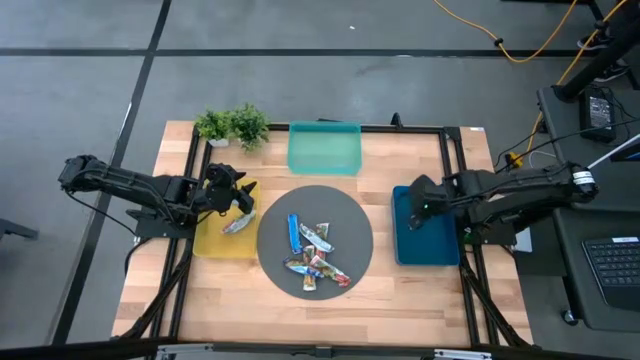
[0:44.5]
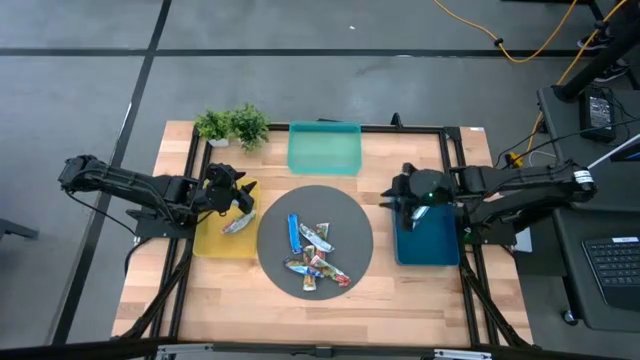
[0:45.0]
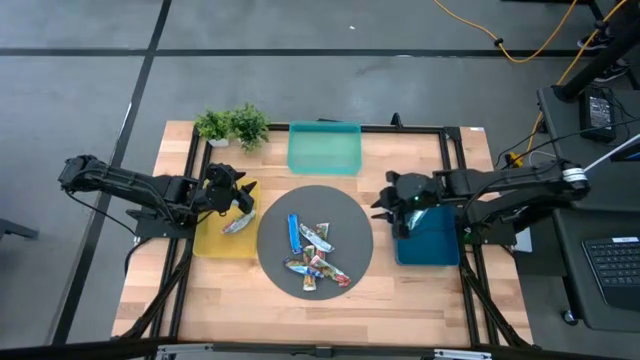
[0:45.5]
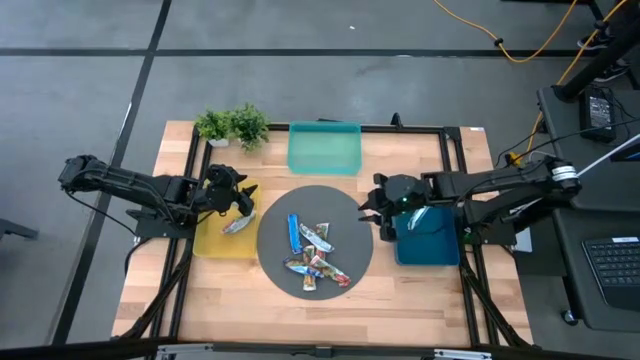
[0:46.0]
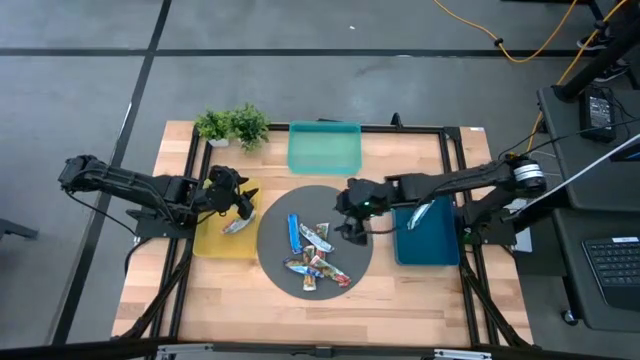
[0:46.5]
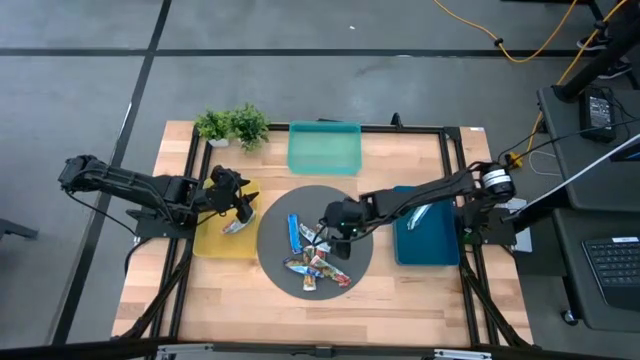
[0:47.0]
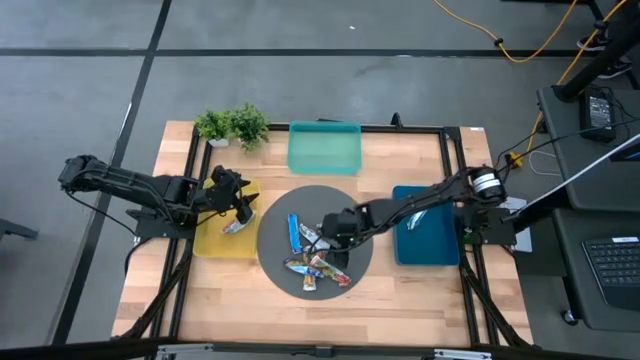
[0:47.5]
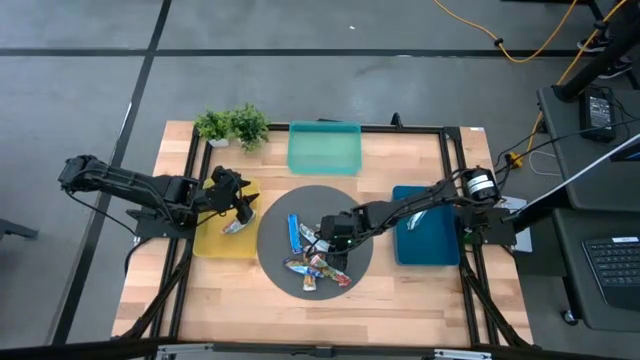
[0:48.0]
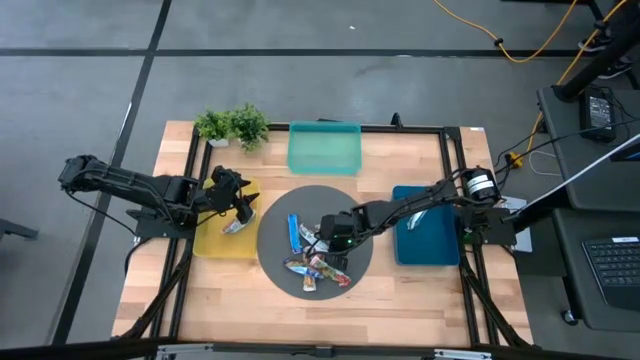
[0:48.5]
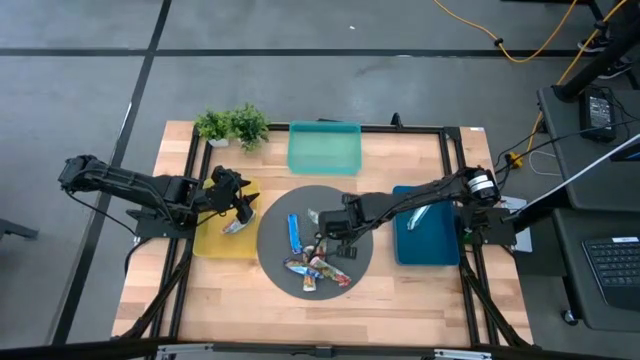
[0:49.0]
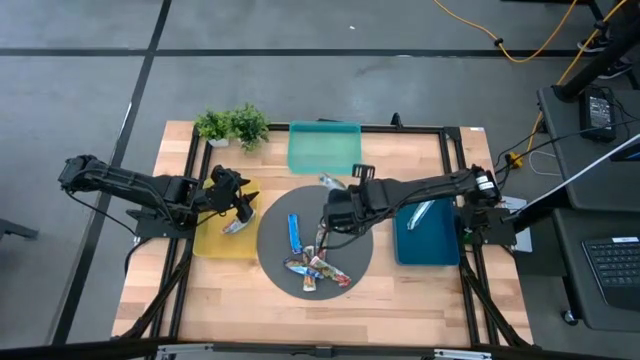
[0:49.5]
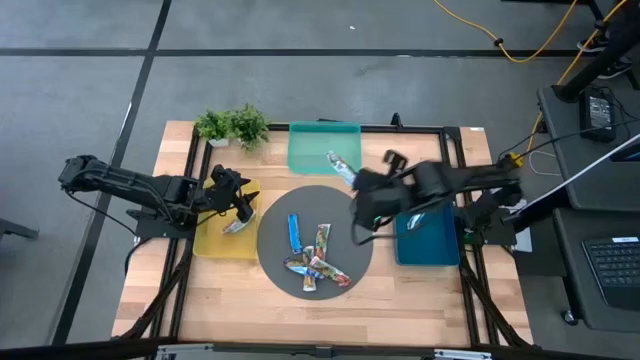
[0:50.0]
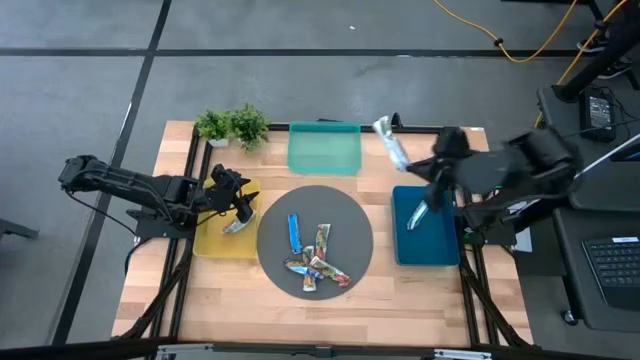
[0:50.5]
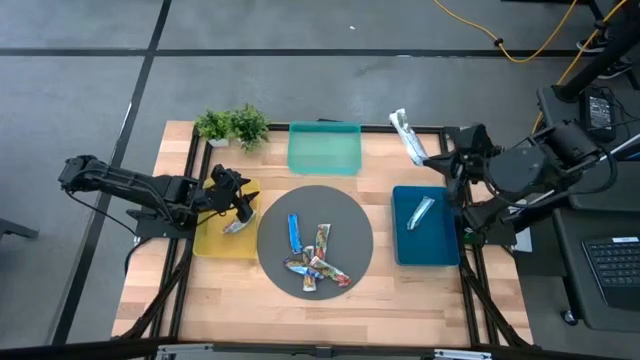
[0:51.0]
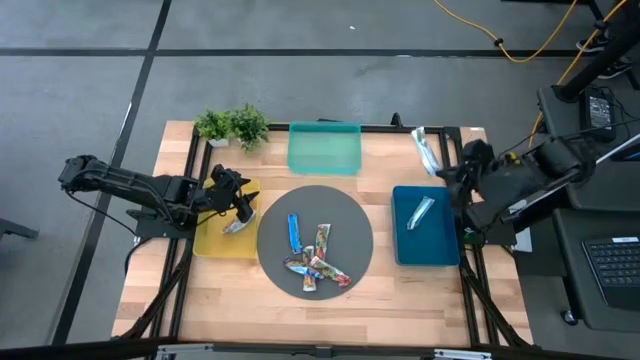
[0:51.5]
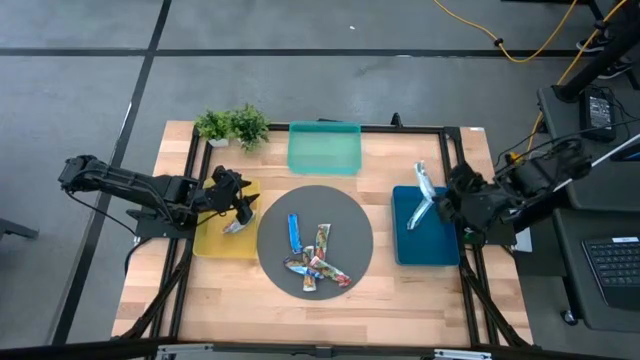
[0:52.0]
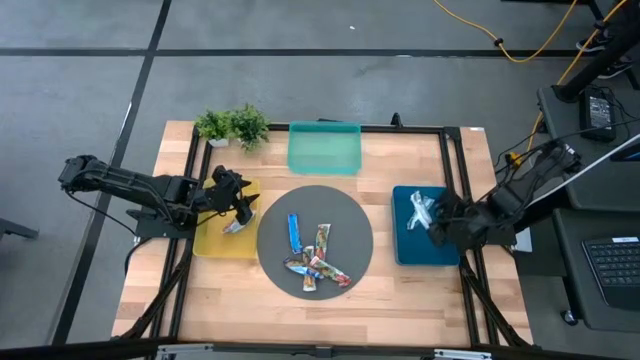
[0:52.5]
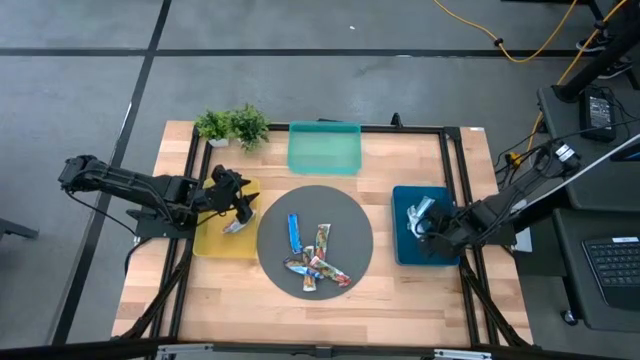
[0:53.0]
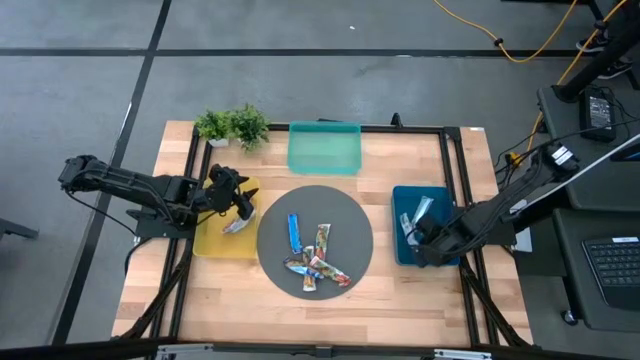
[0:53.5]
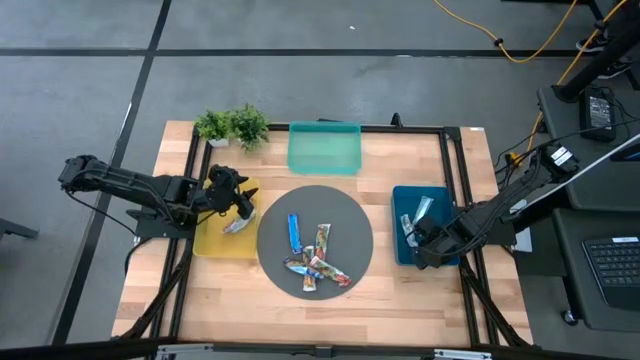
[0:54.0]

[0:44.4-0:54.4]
Task: Pick and place Granola Bars by type
Put the yellow granola bar into the blue bin

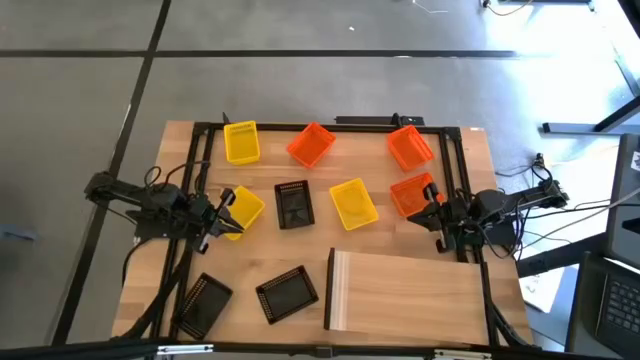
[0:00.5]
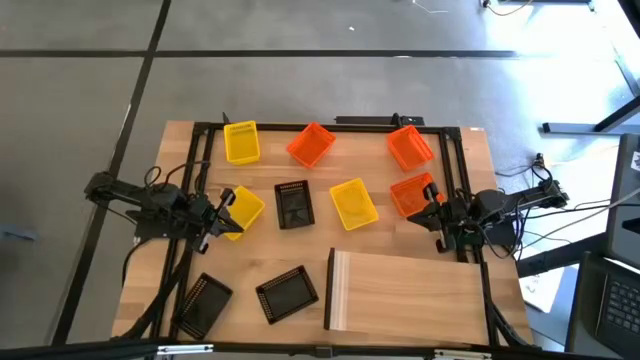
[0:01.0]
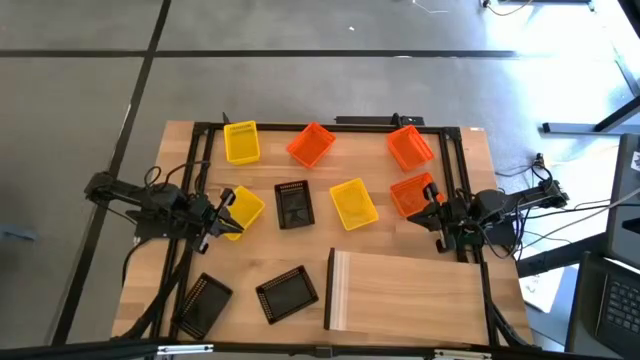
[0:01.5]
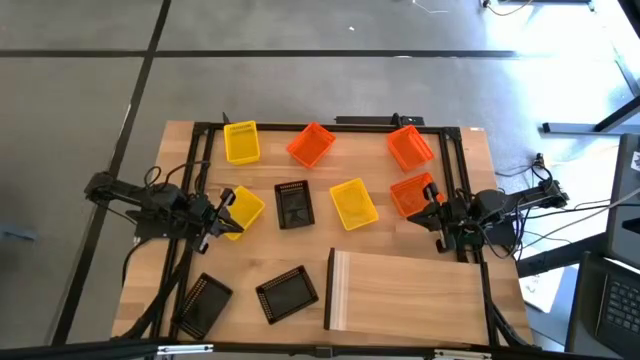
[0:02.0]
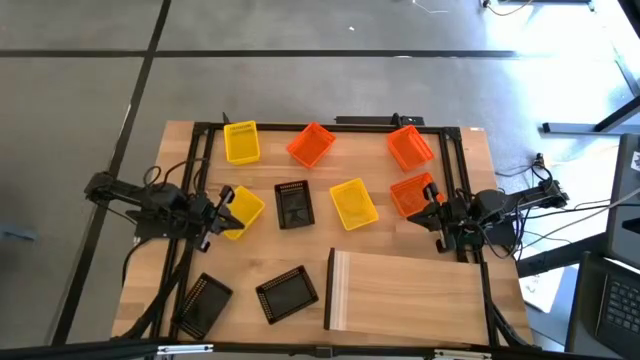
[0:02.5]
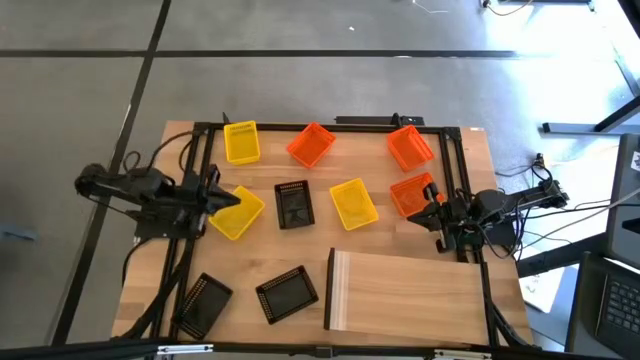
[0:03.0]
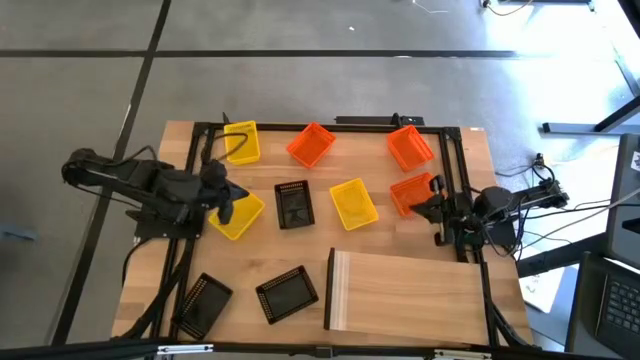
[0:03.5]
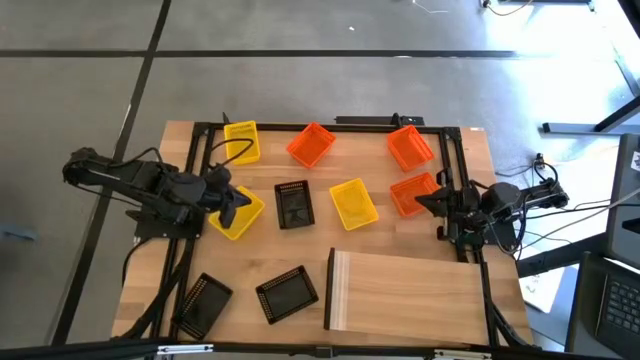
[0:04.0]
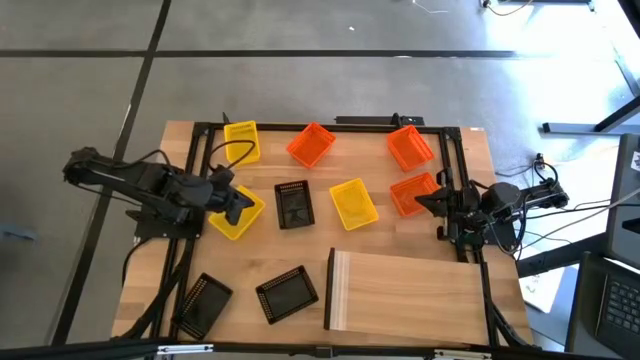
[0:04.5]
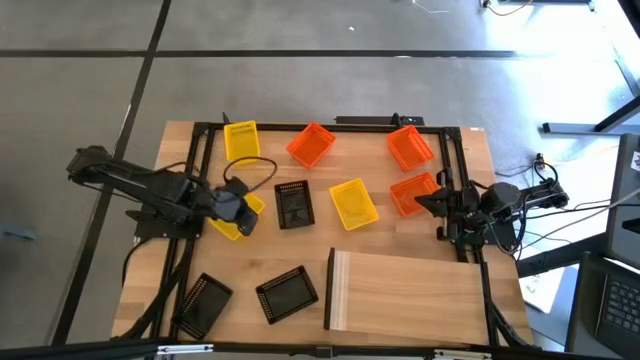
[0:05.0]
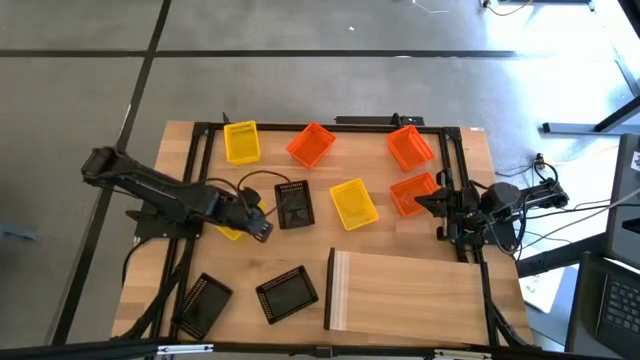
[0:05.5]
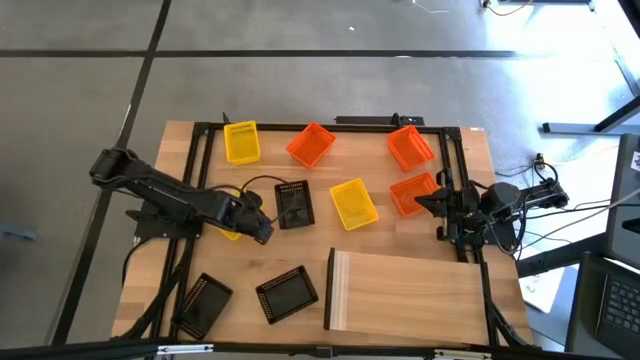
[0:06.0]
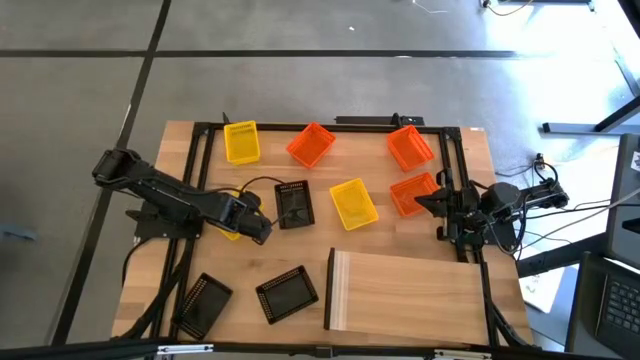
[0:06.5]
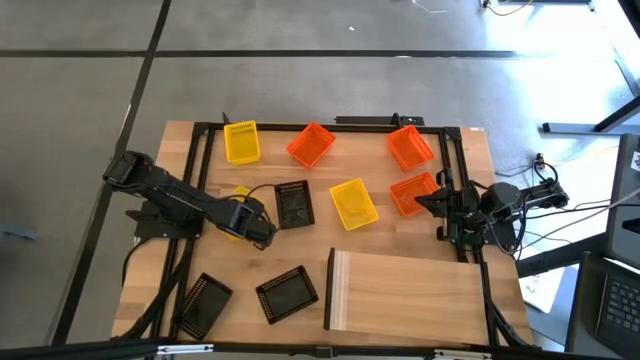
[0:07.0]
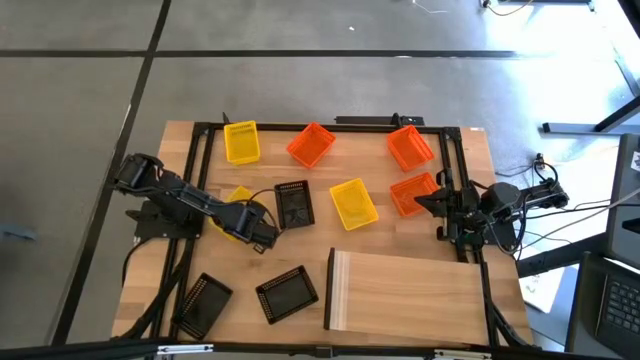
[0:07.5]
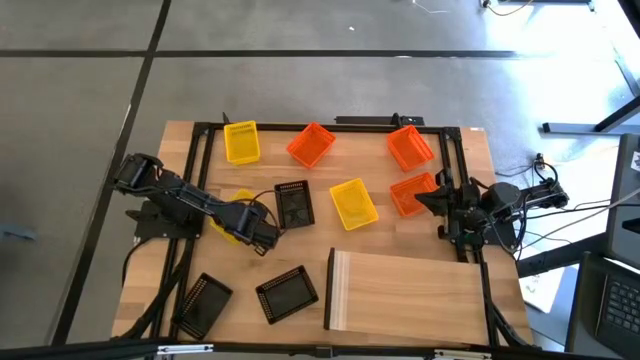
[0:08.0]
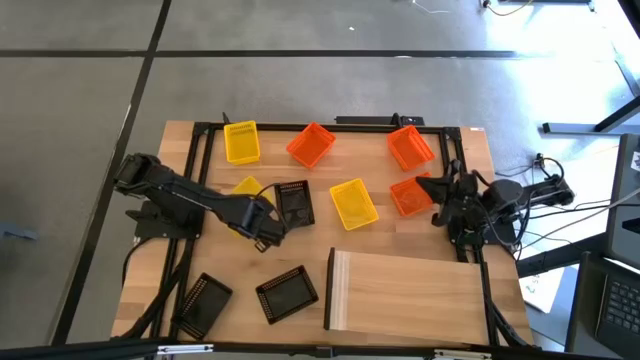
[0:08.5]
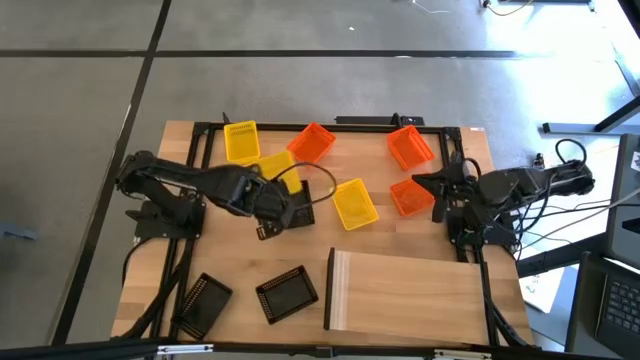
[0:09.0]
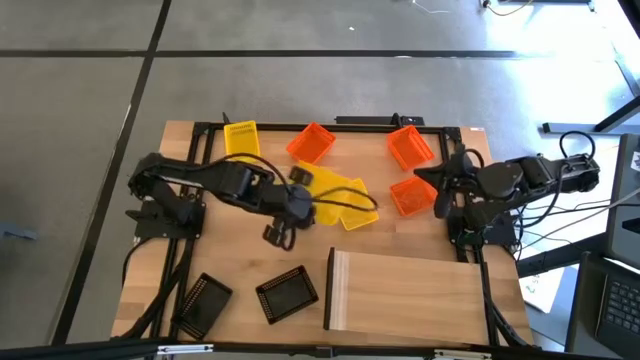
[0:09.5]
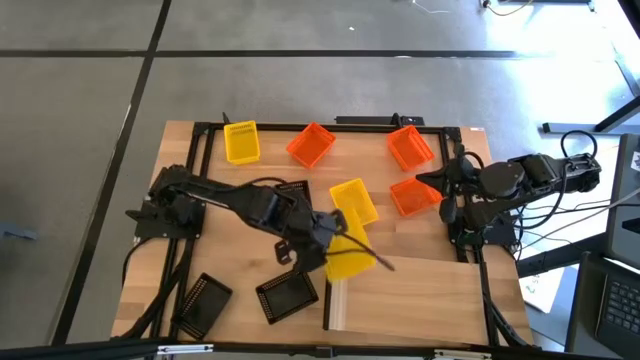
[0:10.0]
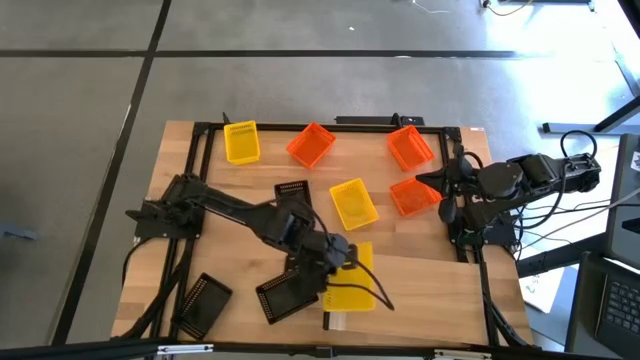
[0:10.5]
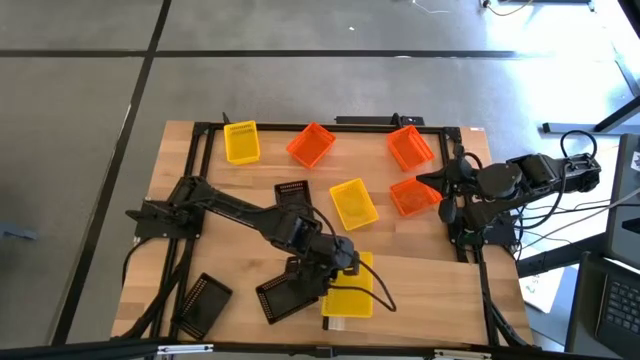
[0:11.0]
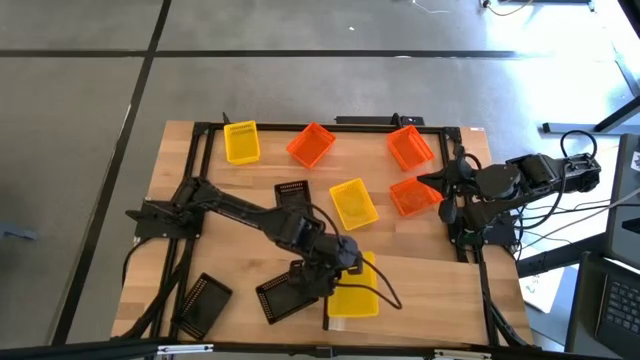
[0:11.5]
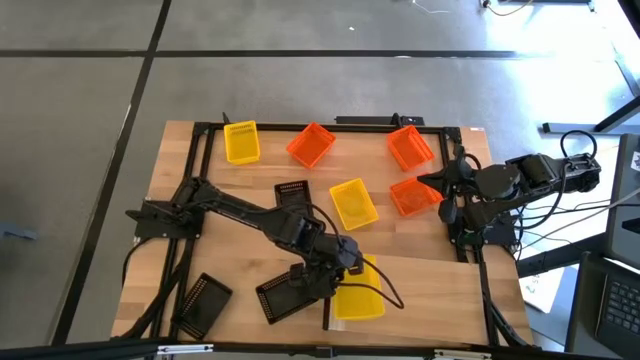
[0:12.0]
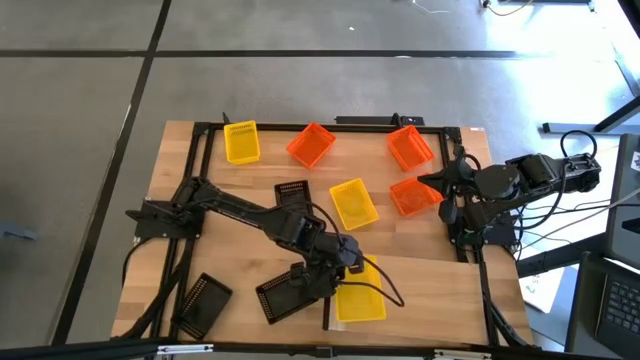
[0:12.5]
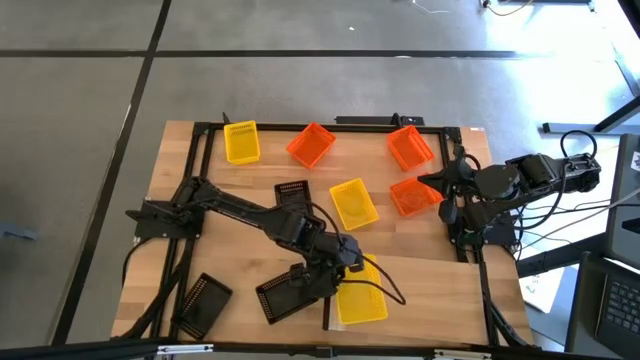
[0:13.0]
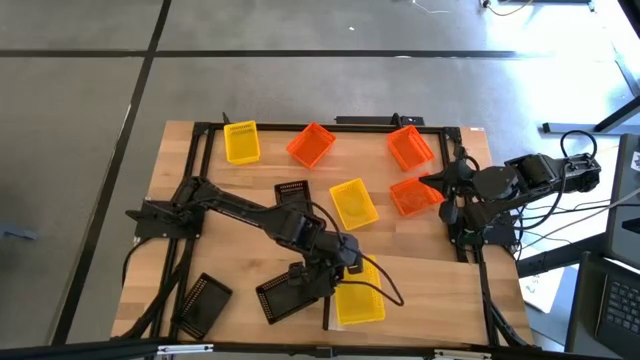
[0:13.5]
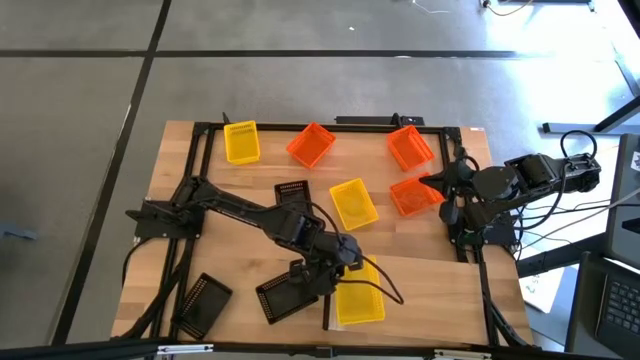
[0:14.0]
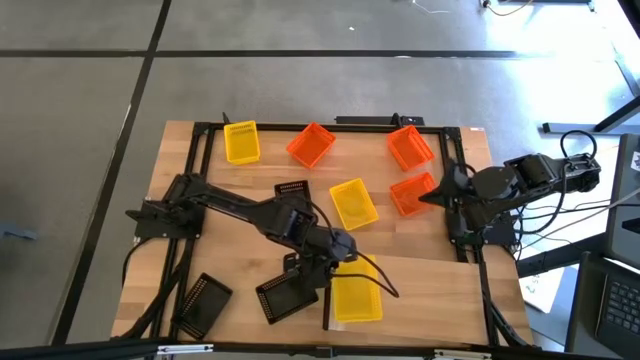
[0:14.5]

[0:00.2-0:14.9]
Task: Stack baskets on shelf by color
Put the bottom left yellow bin on the shelf
